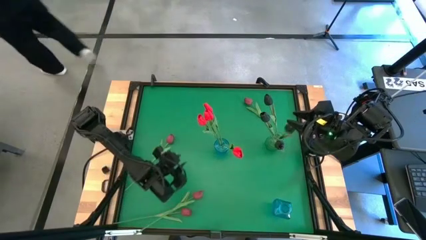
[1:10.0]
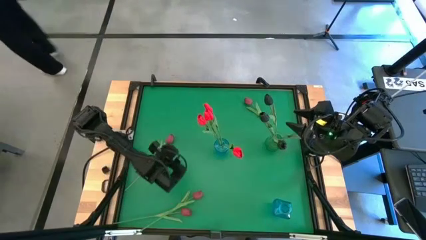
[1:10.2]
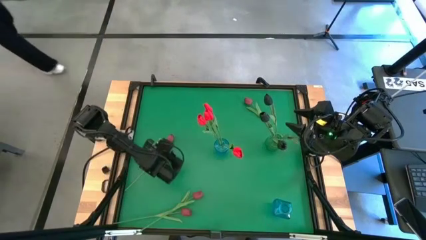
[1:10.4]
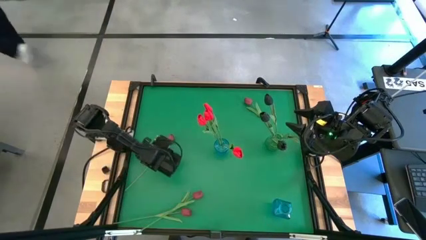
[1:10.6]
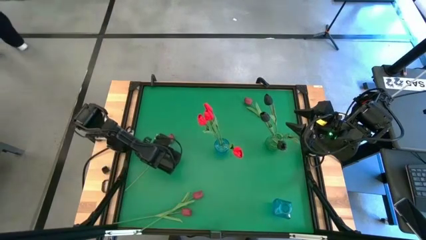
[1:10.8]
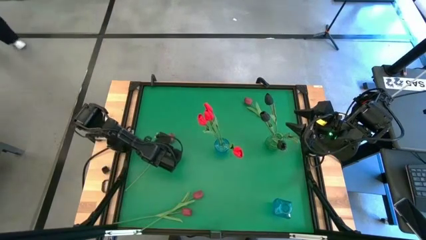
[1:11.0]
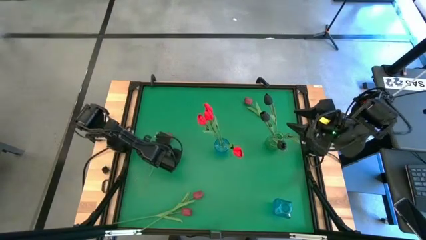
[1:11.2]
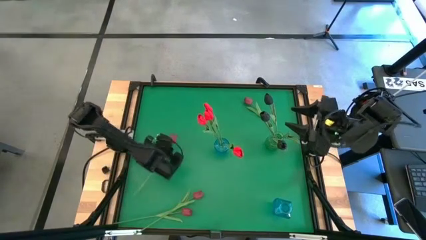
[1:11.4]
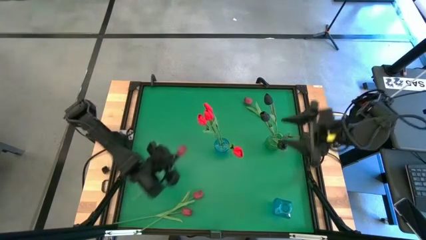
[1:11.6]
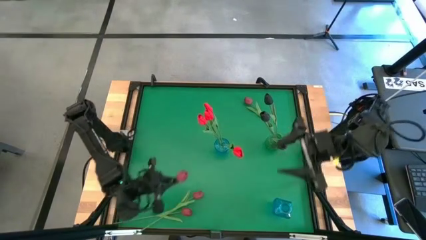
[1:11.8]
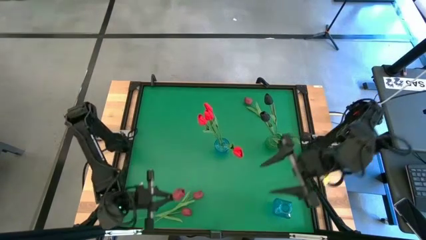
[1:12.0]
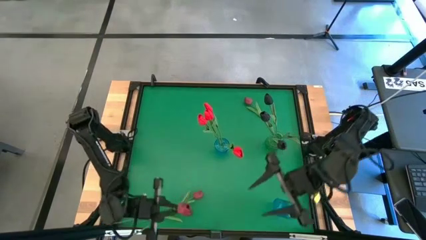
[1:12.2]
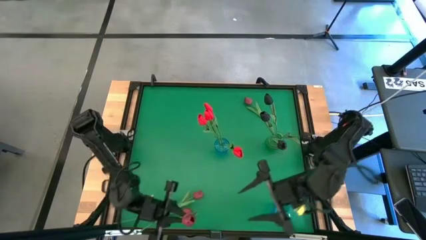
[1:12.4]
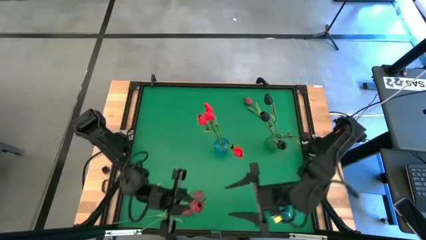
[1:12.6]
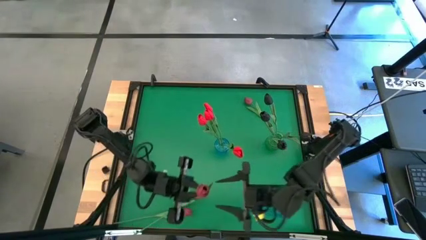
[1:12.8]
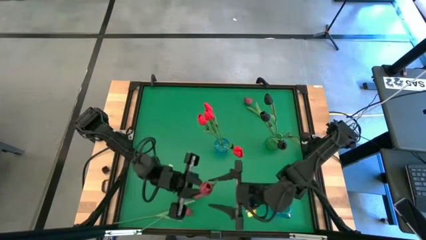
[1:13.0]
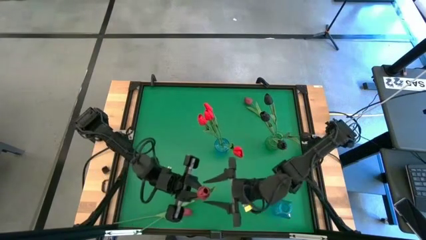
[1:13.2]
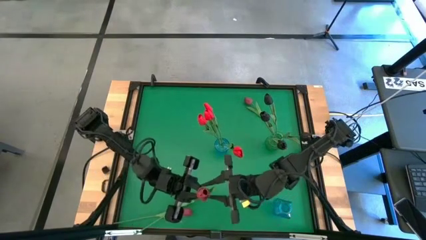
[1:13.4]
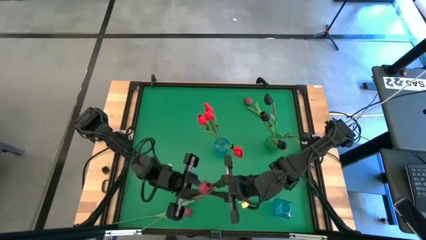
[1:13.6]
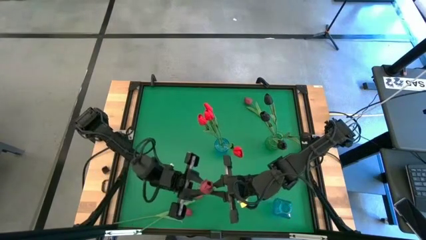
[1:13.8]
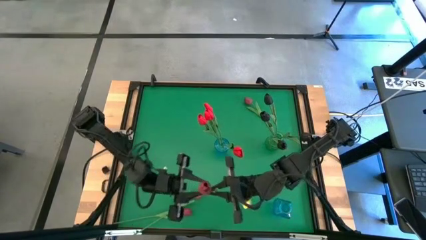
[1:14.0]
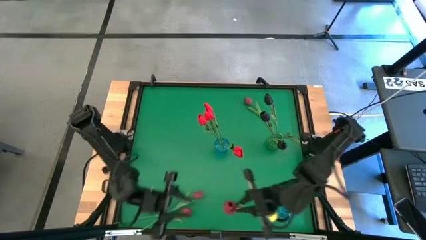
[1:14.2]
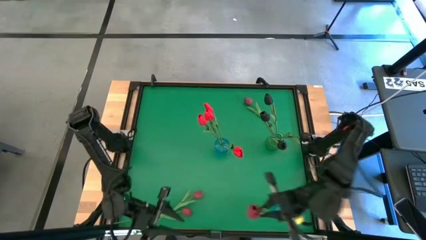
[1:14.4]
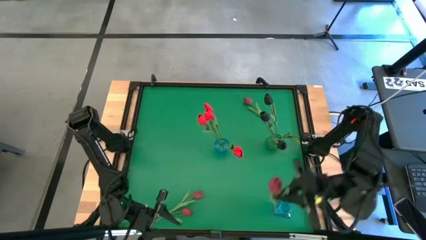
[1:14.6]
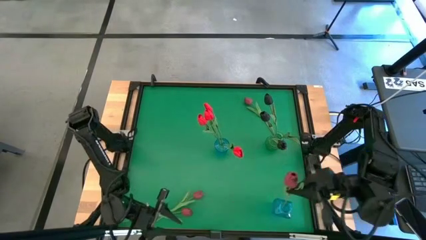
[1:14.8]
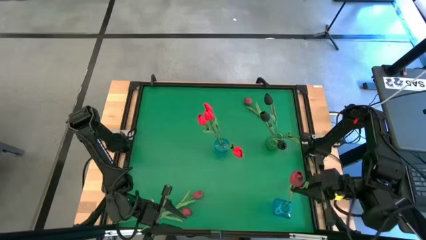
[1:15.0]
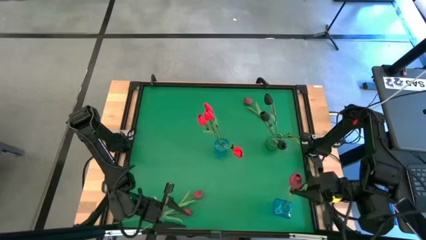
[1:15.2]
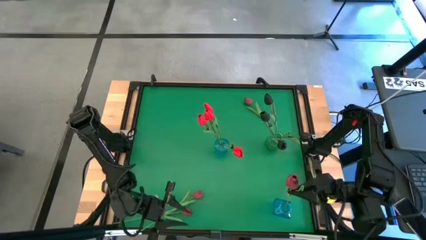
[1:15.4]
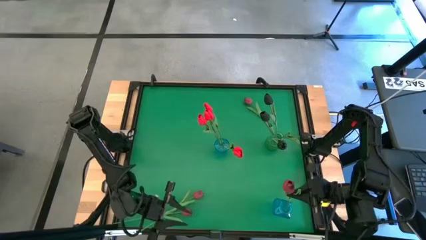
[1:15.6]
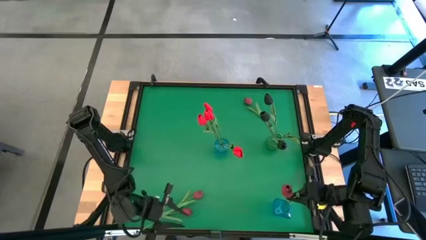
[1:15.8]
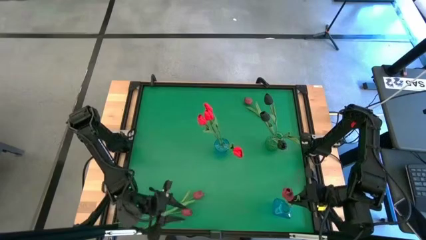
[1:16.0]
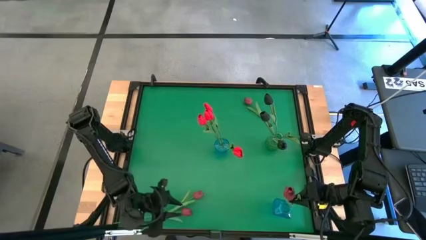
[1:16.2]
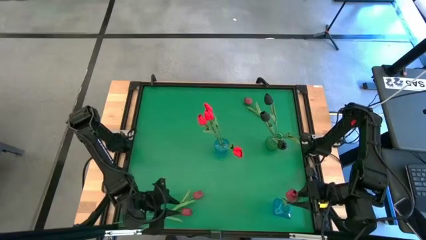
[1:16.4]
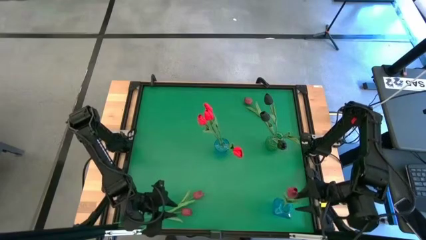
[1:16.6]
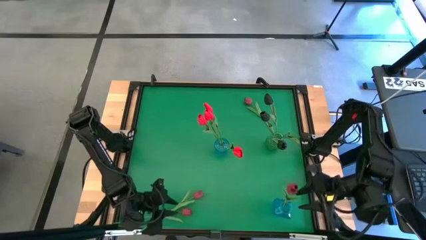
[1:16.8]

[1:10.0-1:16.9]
Task: Sort flowers into vase by color
Put the dark red flower in the bottom blue vase

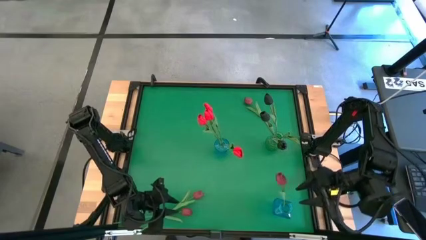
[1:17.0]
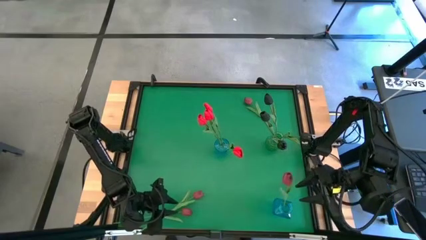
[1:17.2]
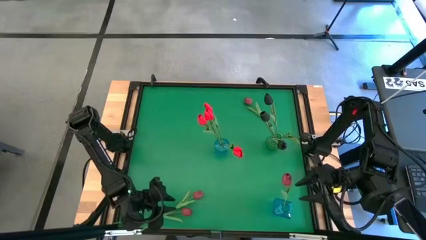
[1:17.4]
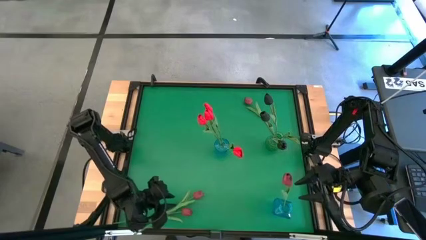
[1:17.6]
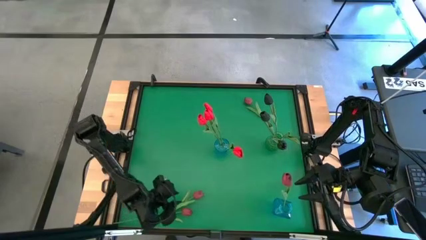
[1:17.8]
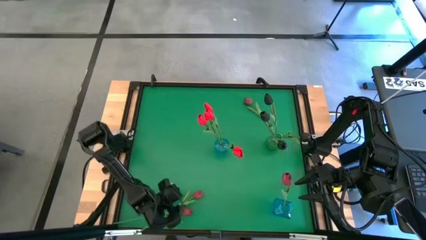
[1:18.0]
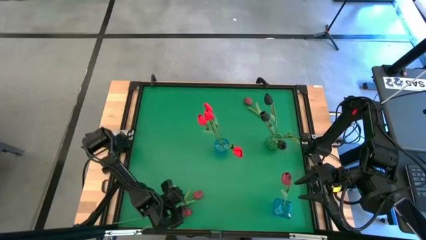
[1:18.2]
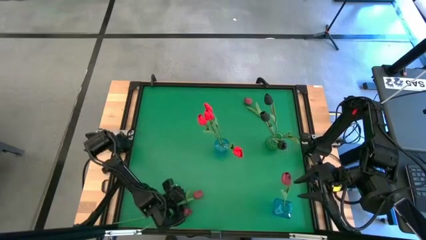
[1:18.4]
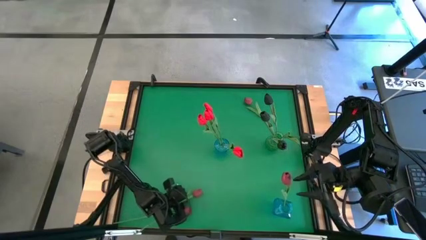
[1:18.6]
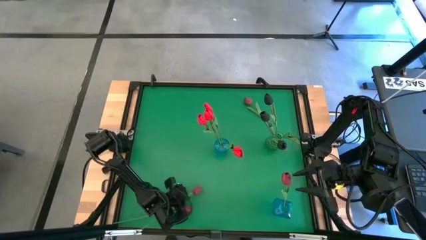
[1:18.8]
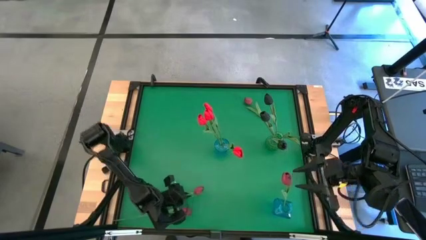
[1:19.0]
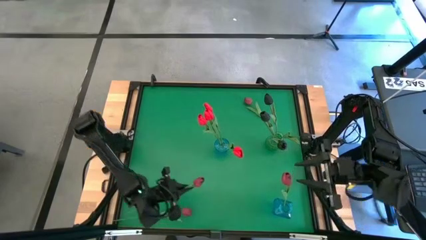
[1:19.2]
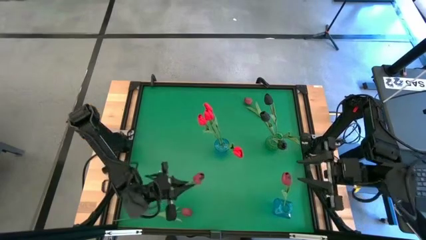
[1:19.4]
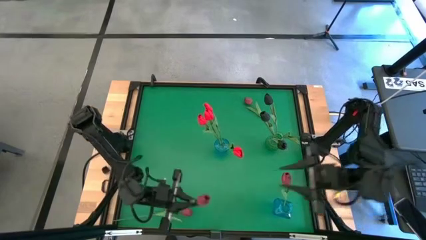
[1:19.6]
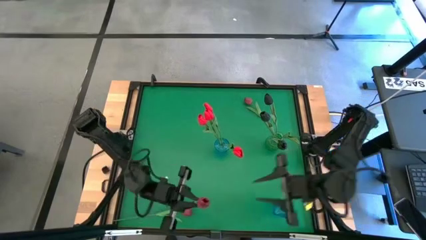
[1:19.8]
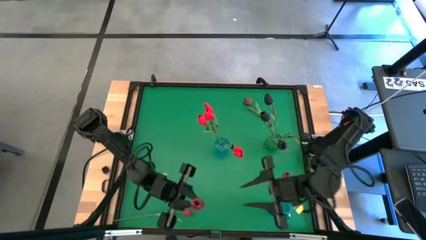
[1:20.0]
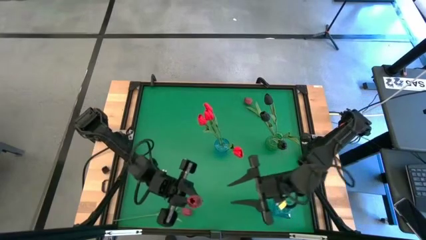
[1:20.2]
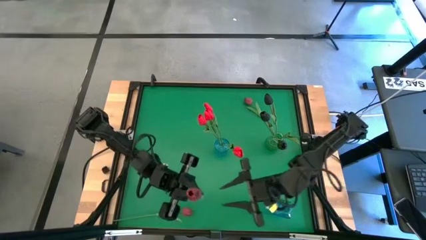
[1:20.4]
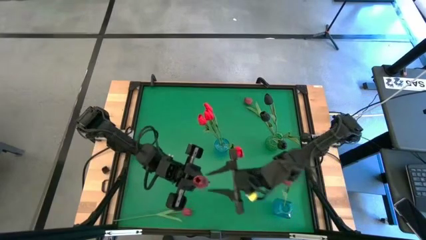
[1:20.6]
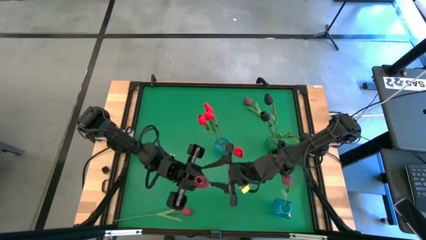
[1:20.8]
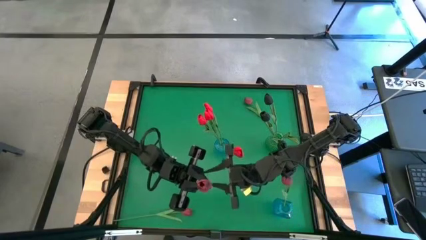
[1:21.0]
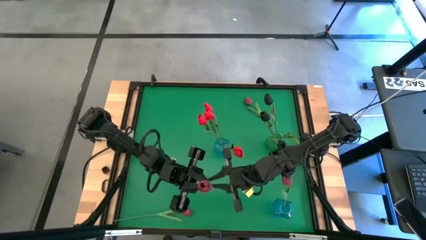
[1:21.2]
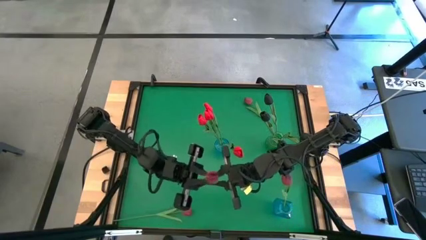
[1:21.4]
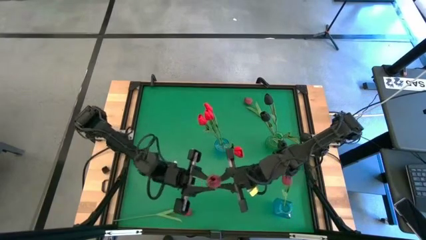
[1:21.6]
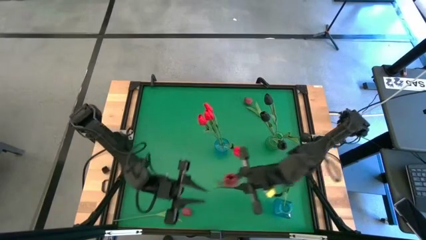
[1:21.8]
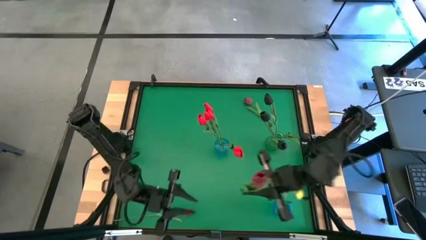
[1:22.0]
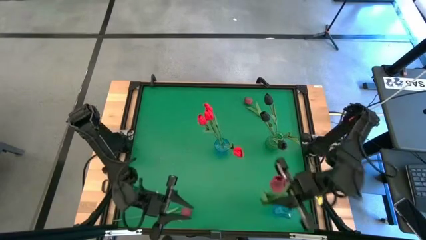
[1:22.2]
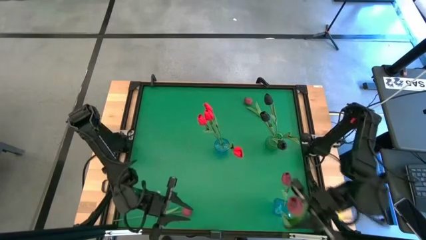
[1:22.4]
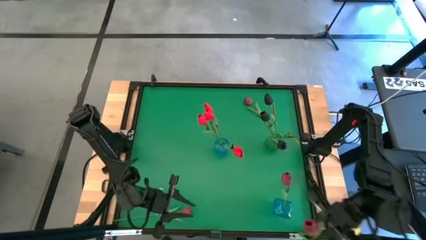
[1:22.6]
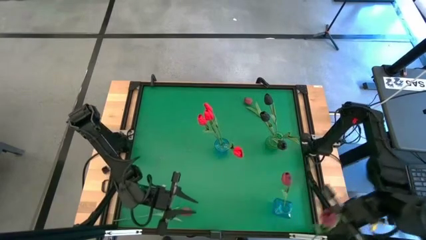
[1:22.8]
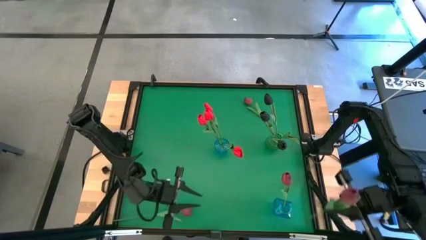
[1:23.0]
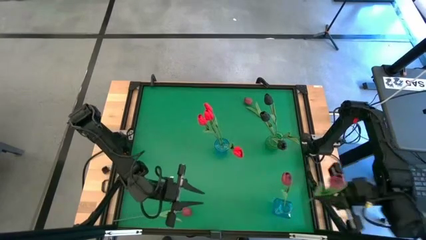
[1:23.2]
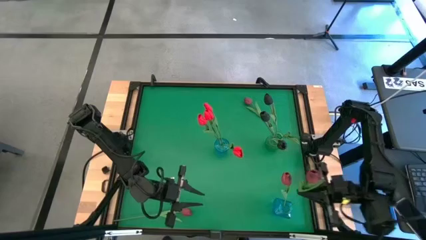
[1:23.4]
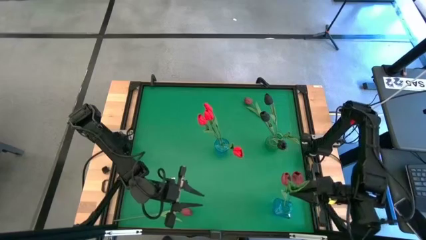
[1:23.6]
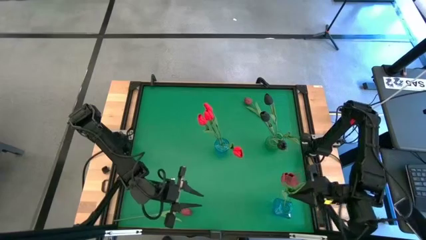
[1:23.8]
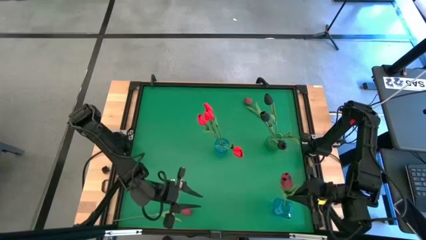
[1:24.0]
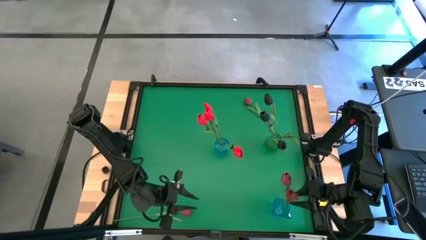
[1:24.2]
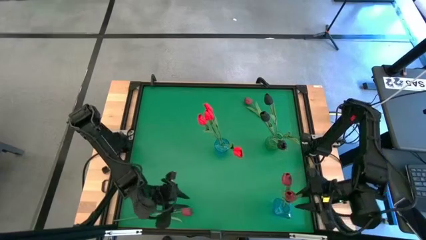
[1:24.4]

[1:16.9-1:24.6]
Put the dark red flower in the bottom blue vase
